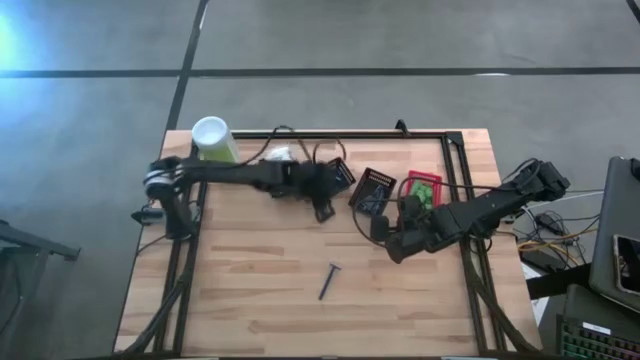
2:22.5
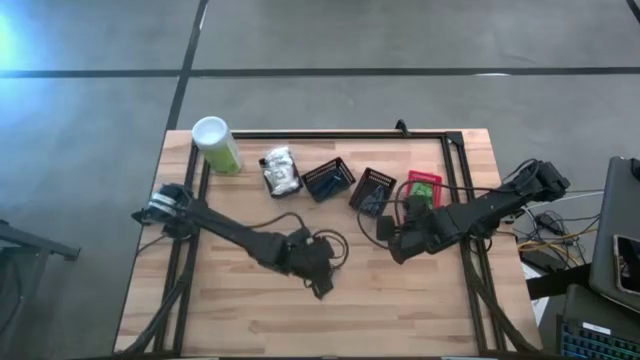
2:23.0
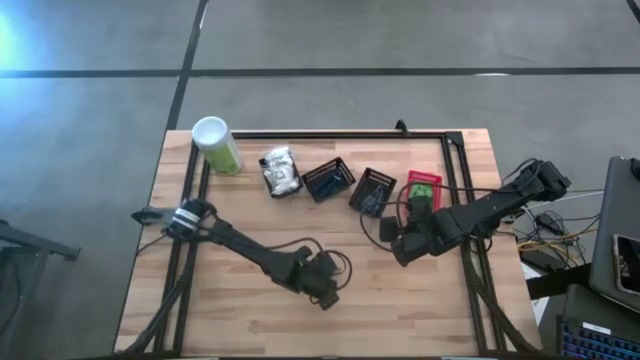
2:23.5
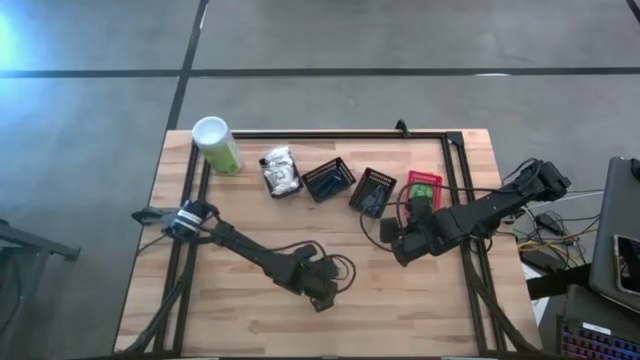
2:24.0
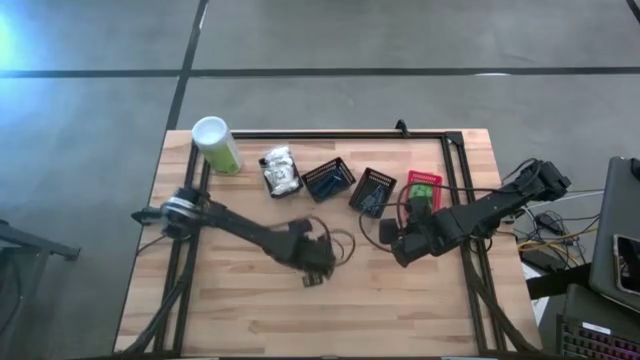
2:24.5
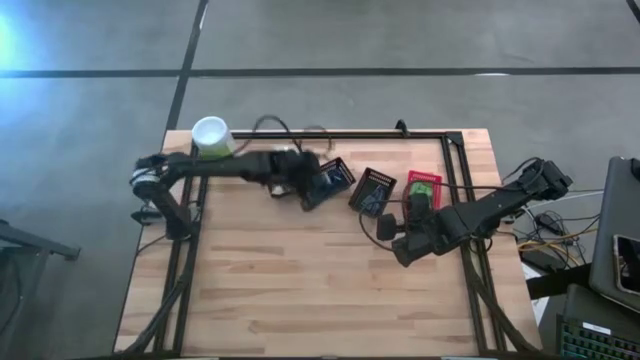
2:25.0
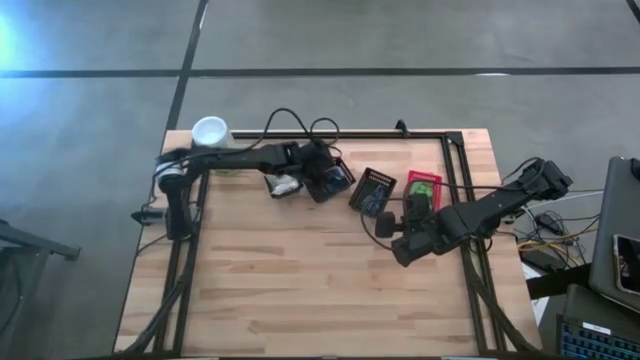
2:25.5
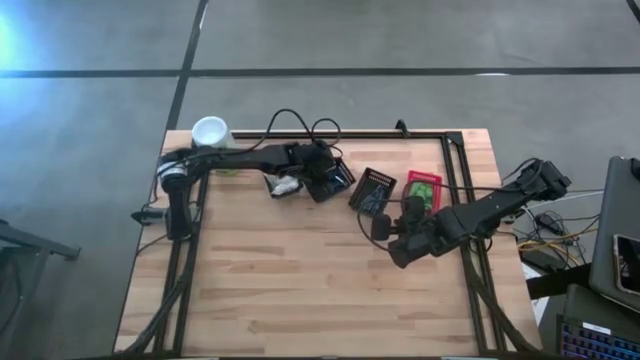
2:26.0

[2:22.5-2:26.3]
Task: Pick & Place Travel size toiletries
Put the razor into the middle black bin

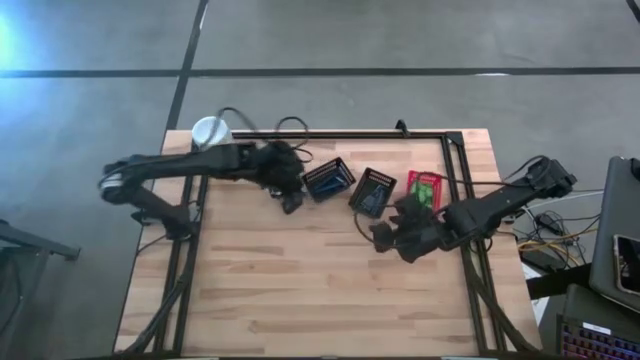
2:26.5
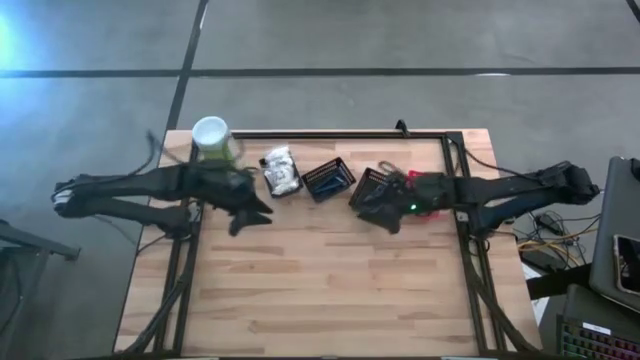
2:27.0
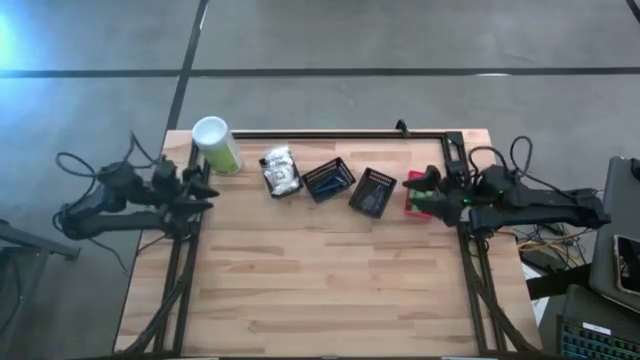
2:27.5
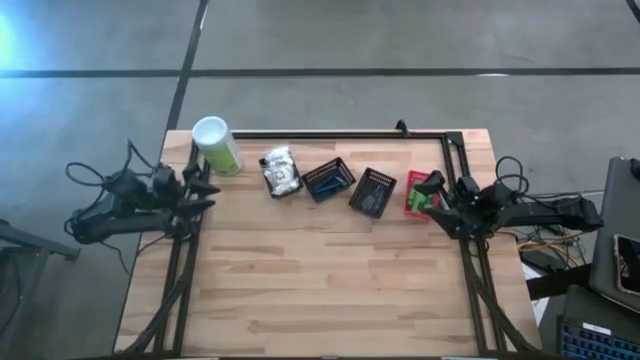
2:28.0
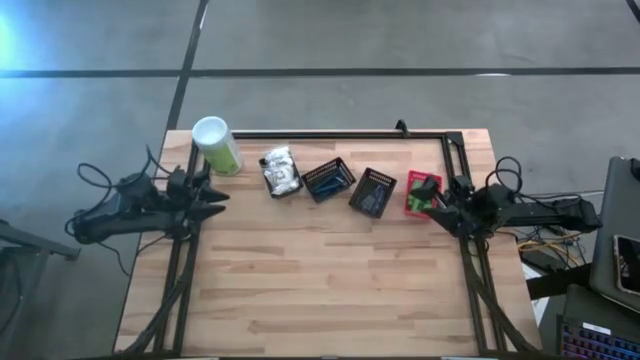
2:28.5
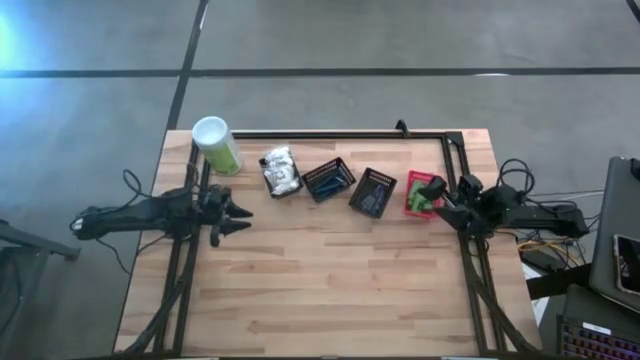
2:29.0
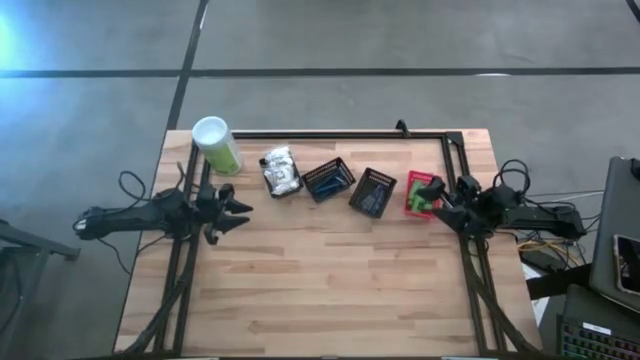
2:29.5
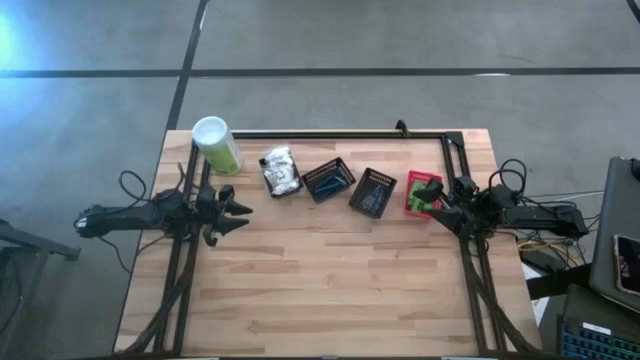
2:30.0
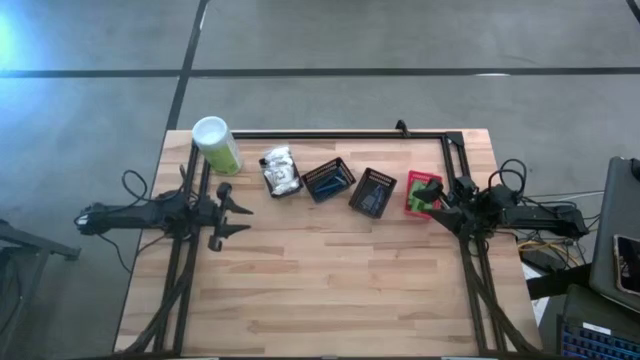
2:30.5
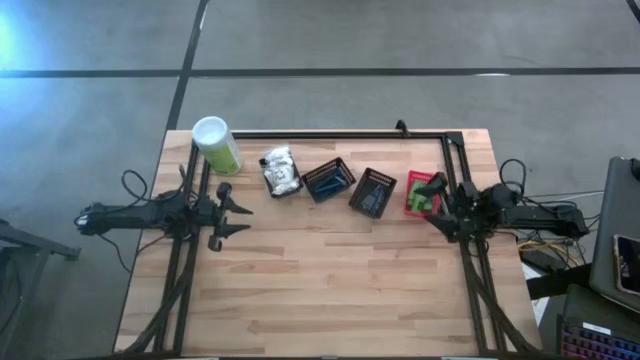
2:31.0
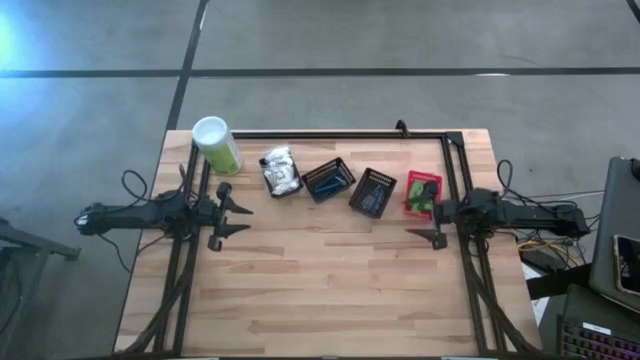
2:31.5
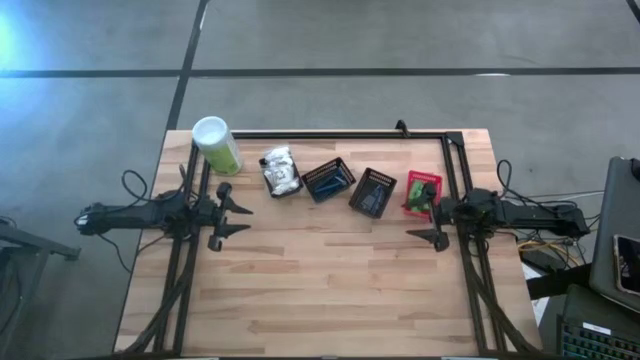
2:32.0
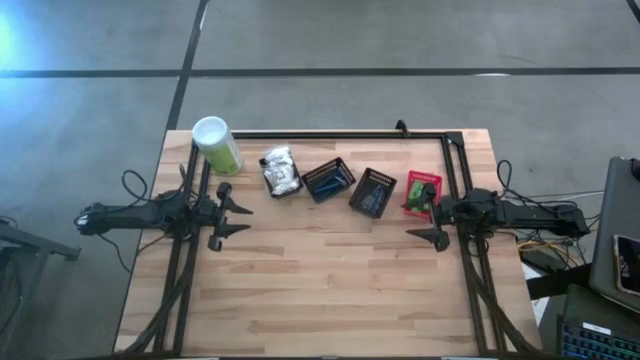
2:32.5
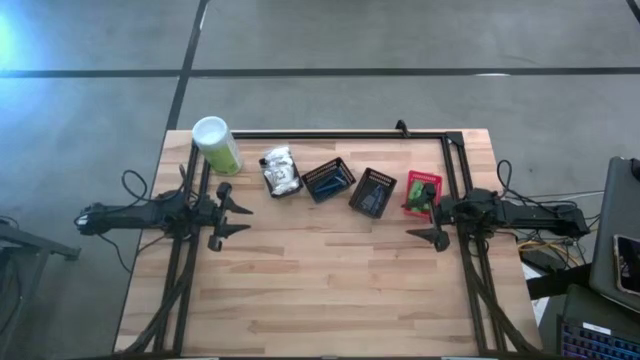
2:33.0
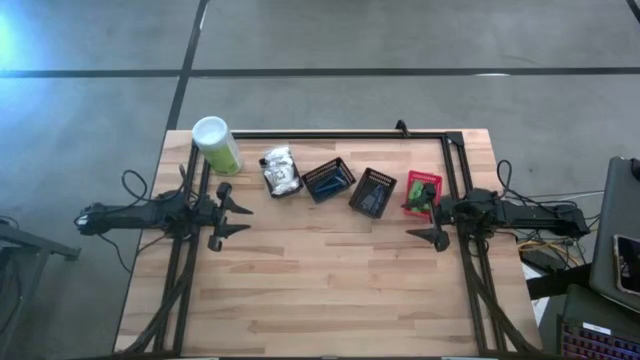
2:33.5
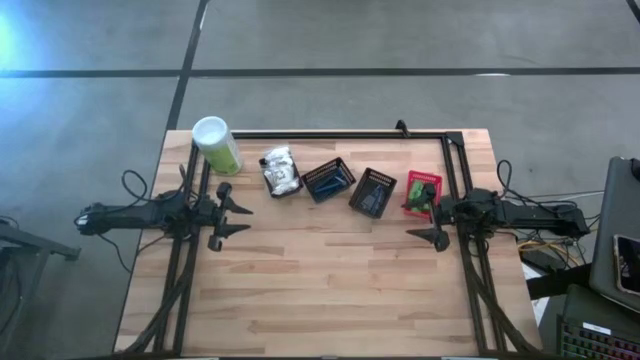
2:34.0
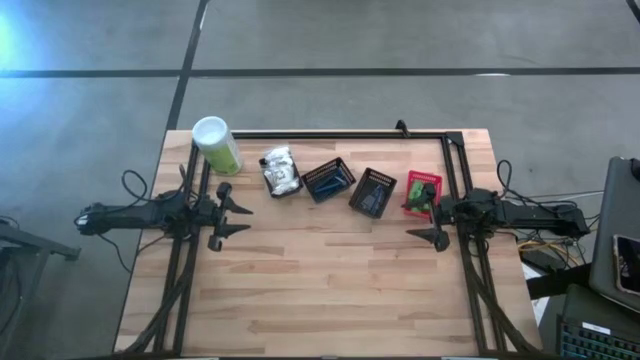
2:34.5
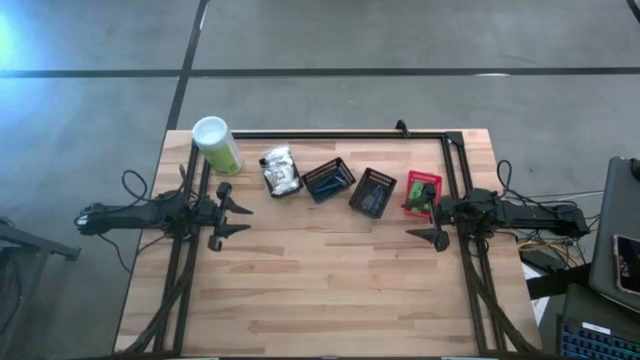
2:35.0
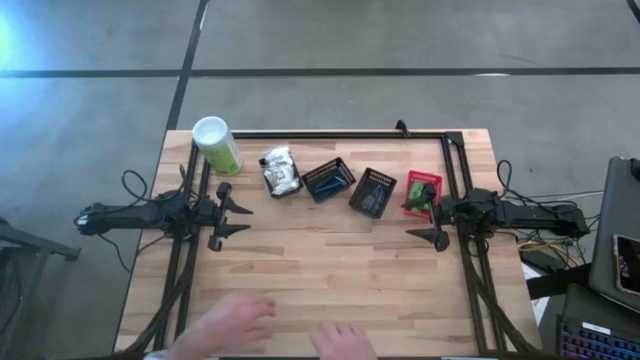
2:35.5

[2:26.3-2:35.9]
Return to Home Position

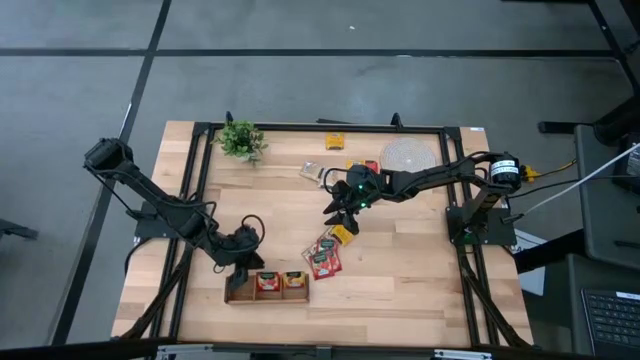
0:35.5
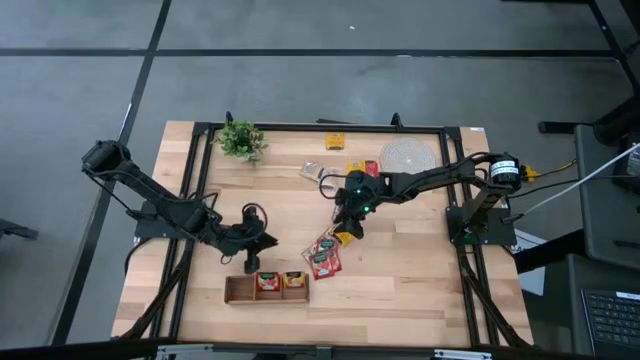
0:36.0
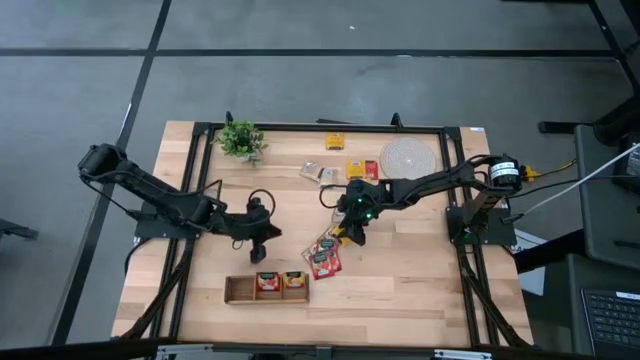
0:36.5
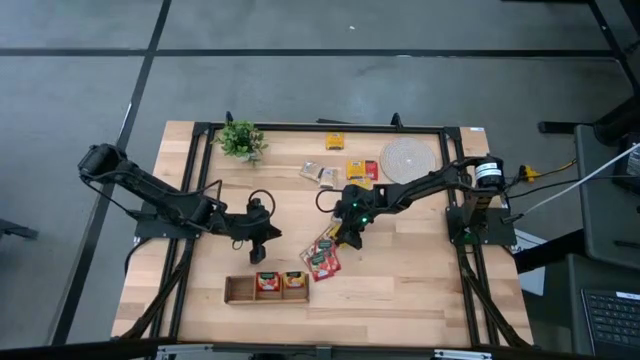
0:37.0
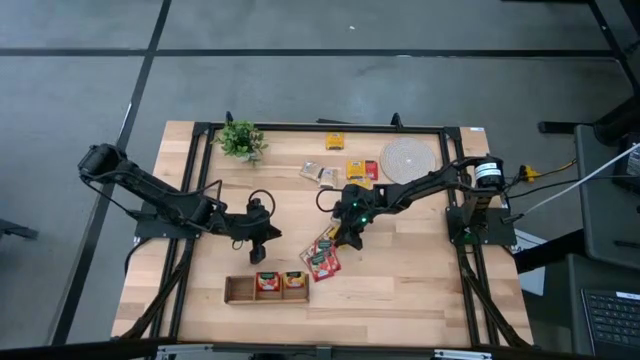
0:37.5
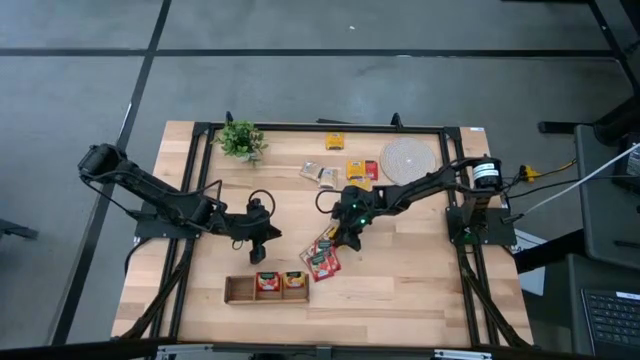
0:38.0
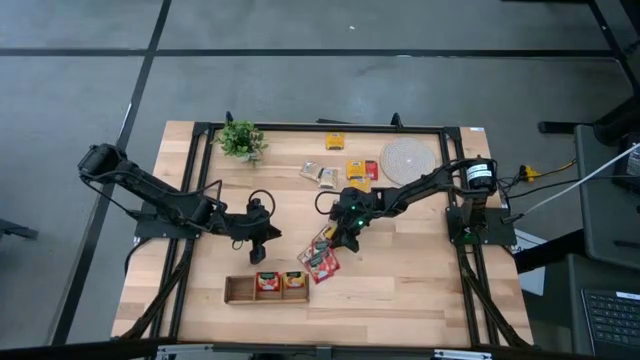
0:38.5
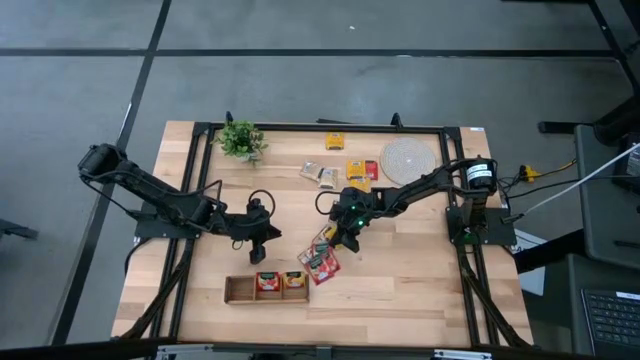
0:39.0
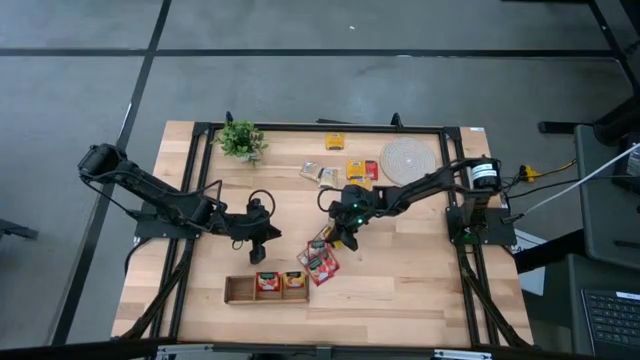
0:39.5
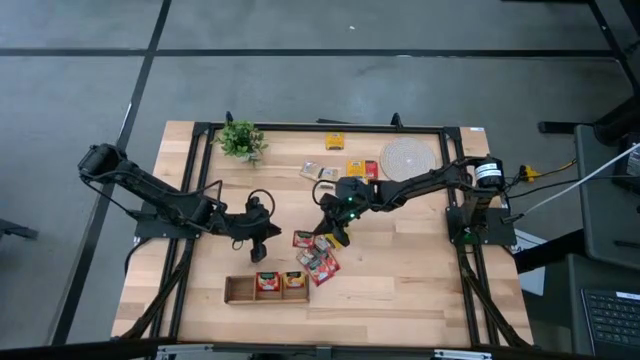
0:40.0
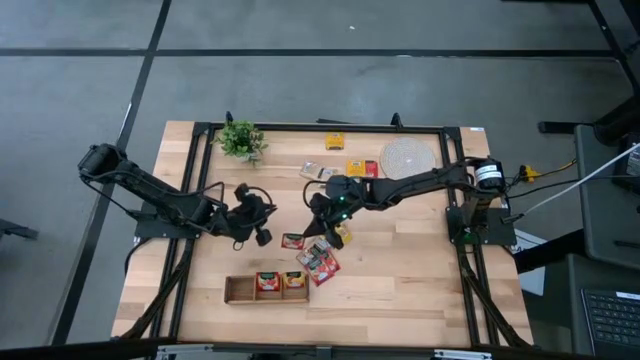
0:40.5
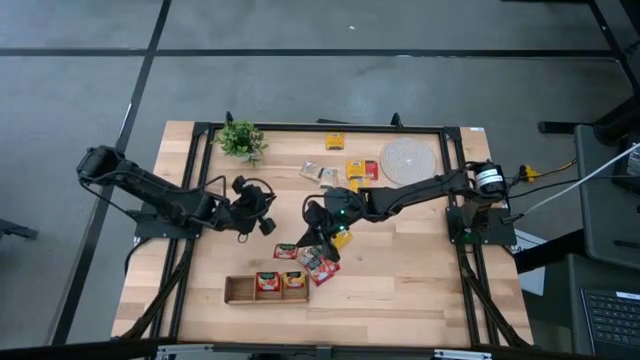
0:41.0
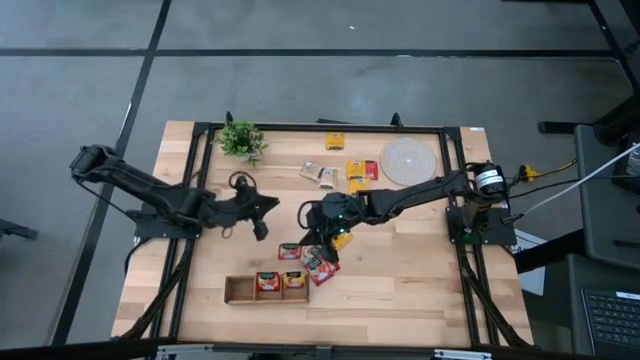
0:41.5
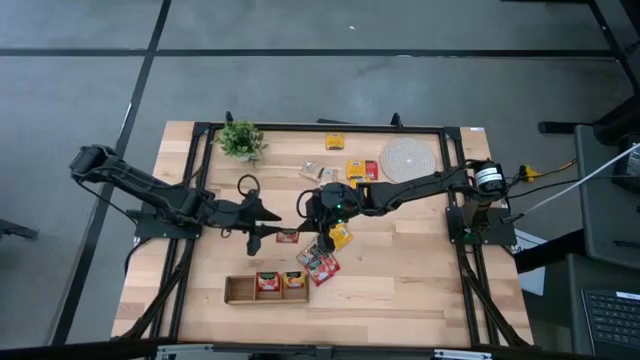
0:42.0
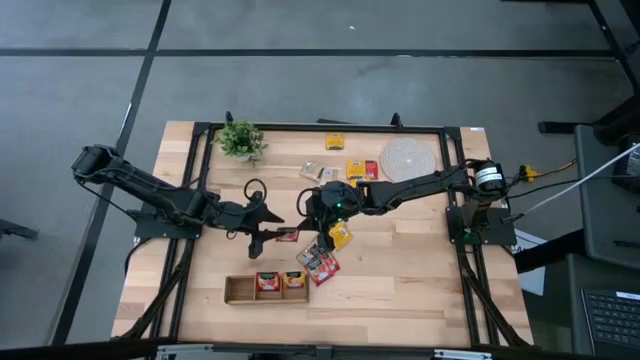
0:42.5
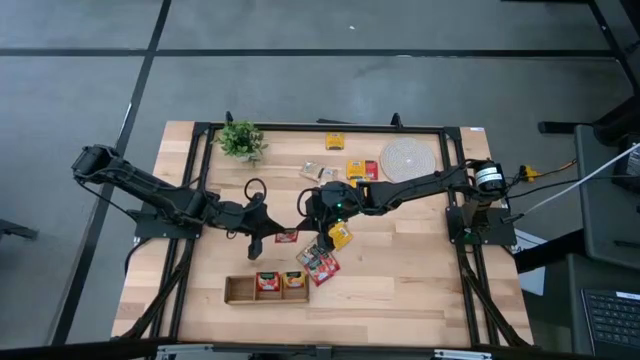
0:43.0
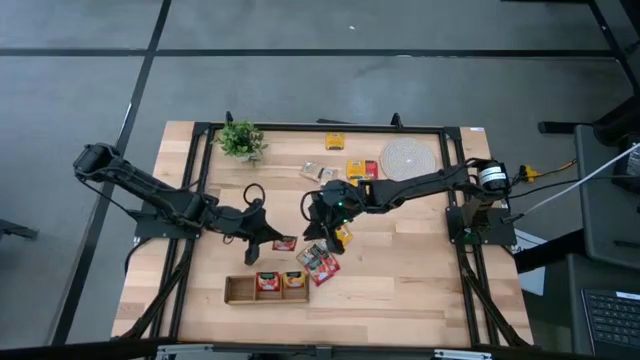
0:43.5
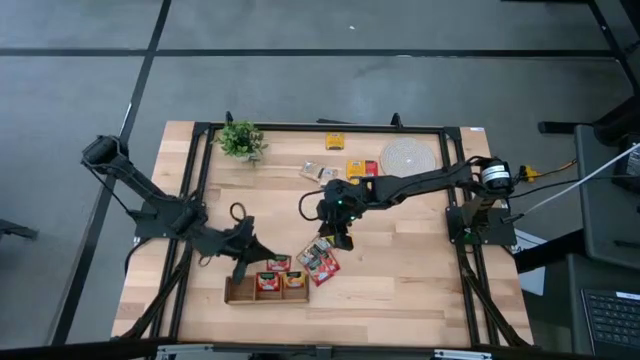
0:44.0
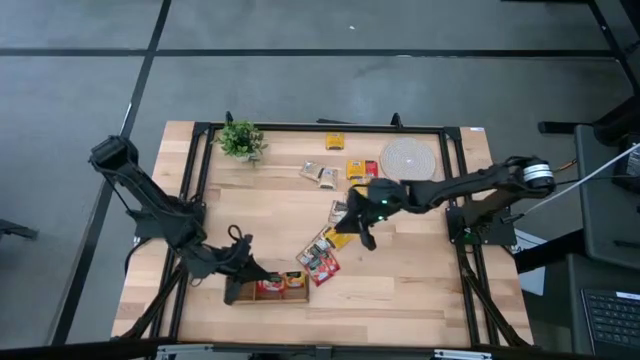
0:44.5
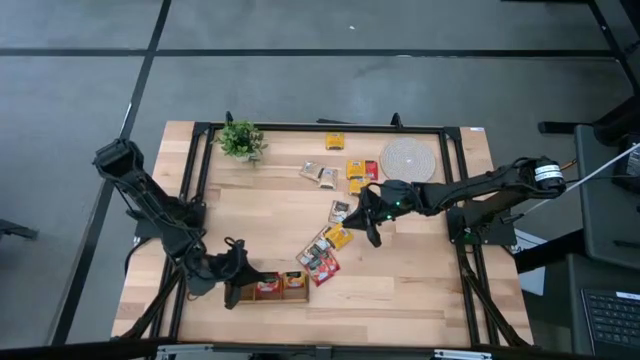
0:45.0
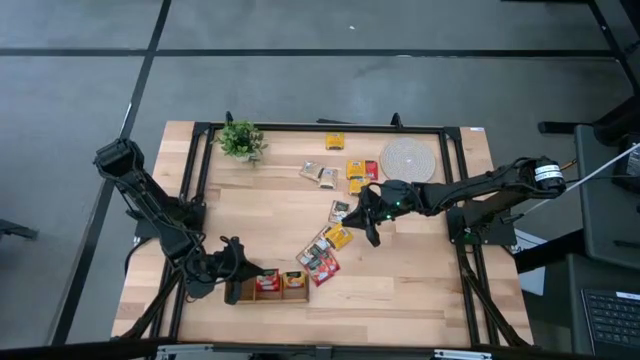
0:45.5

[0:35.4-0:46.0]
Task: Pick & Place Tea
Put the red tea bag into the middle section of the wooden organizer
